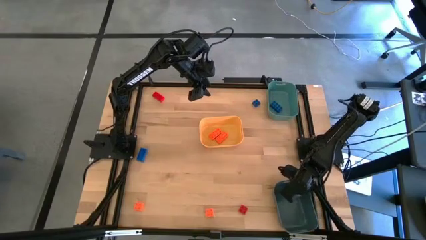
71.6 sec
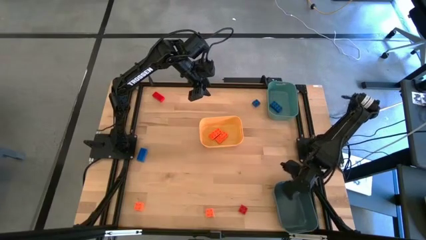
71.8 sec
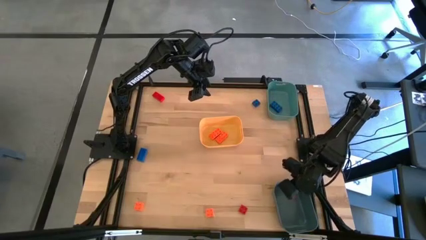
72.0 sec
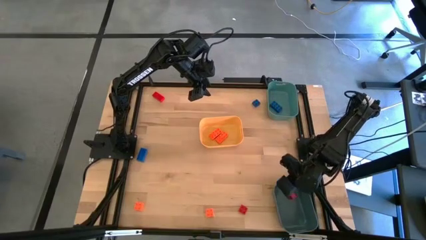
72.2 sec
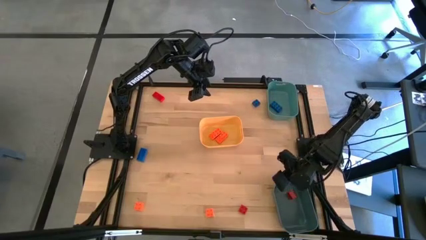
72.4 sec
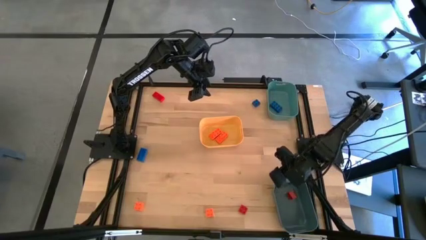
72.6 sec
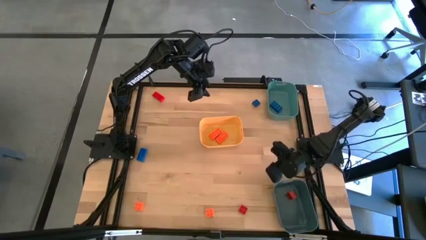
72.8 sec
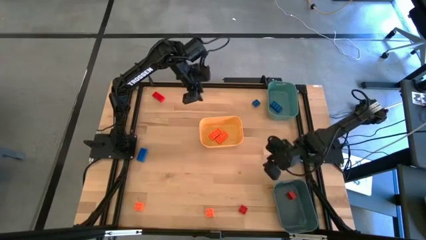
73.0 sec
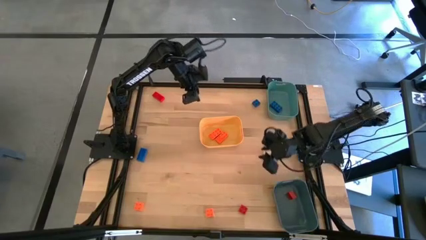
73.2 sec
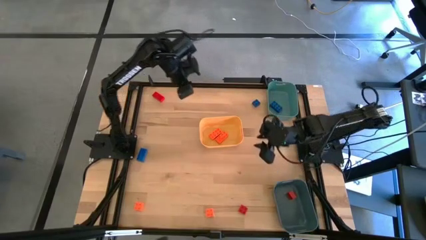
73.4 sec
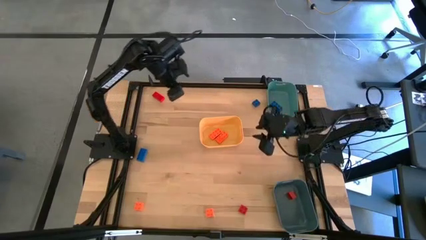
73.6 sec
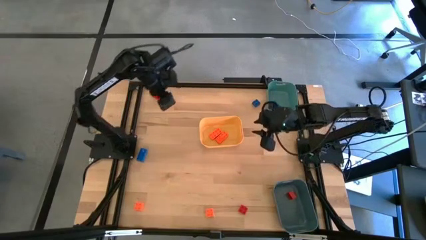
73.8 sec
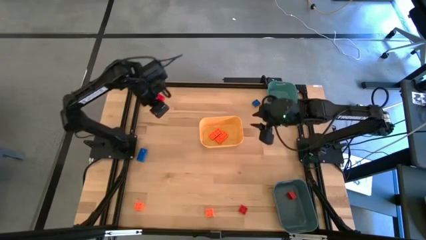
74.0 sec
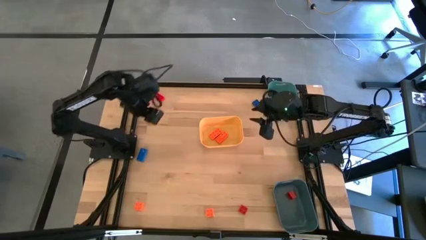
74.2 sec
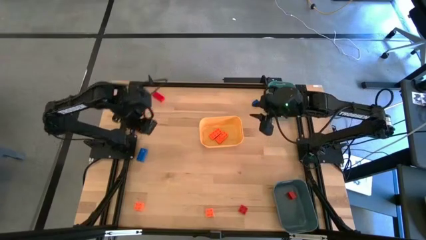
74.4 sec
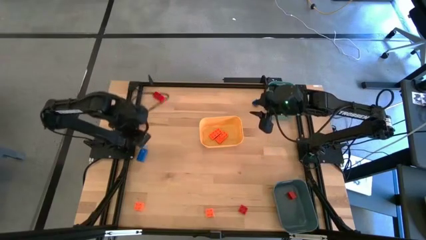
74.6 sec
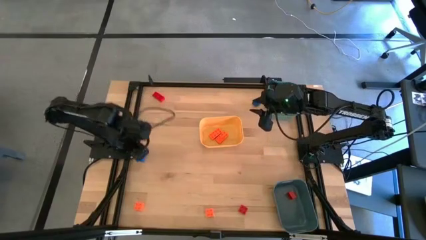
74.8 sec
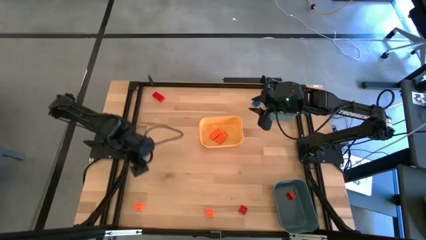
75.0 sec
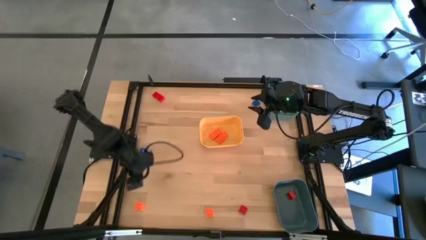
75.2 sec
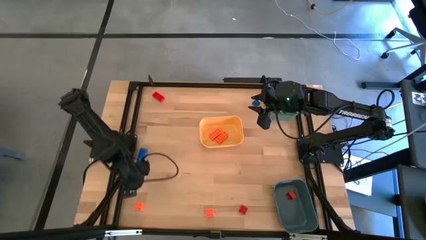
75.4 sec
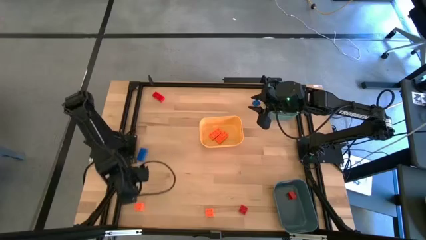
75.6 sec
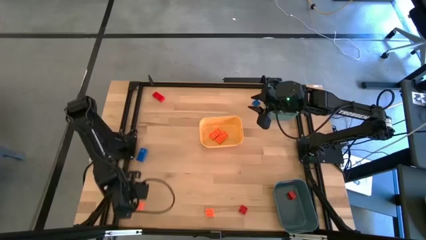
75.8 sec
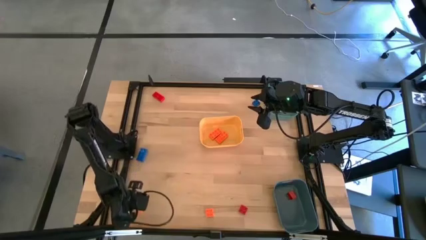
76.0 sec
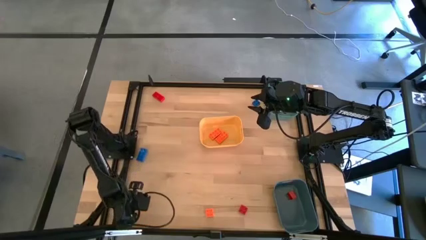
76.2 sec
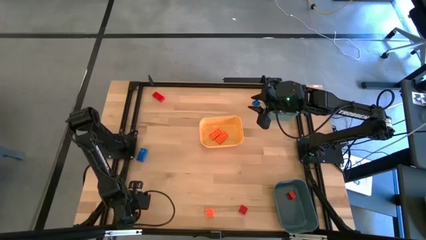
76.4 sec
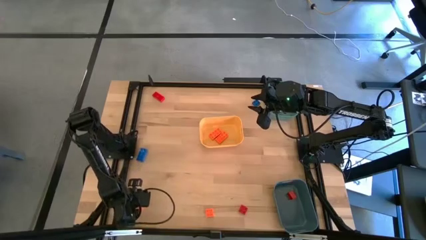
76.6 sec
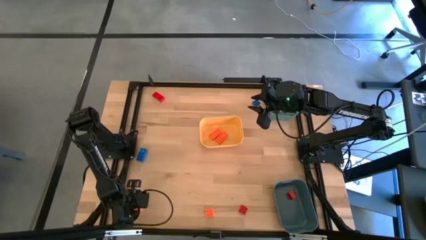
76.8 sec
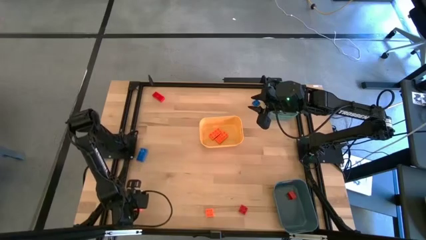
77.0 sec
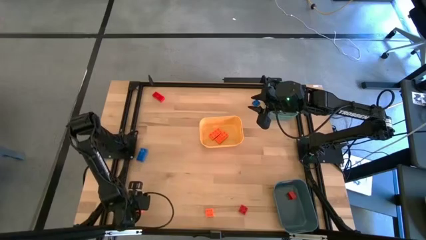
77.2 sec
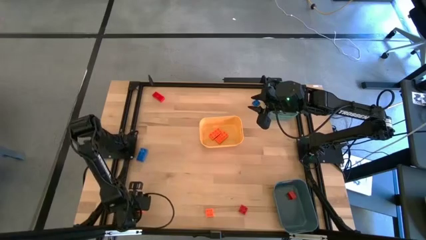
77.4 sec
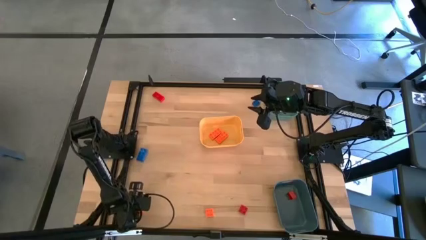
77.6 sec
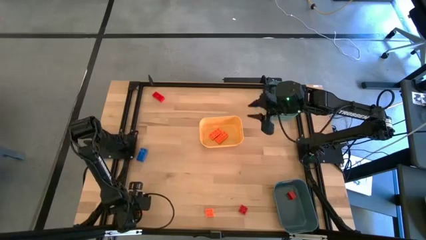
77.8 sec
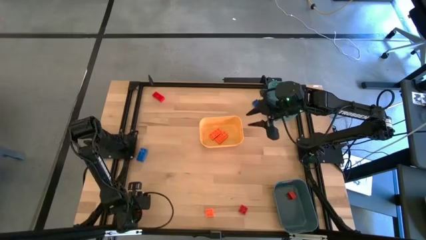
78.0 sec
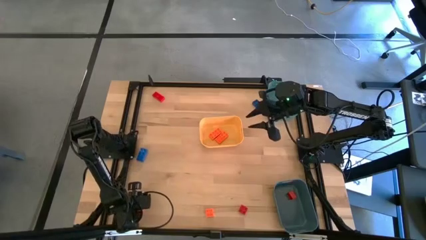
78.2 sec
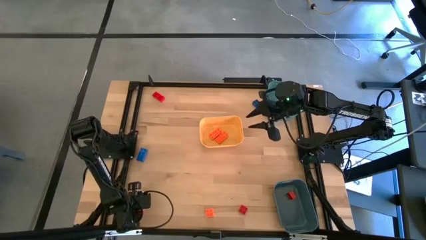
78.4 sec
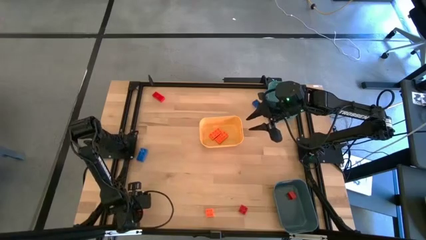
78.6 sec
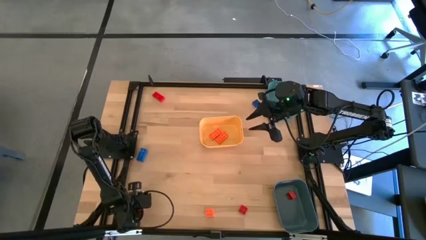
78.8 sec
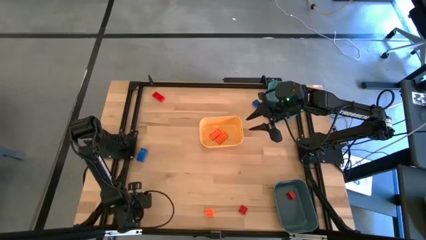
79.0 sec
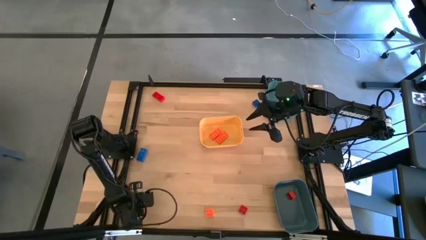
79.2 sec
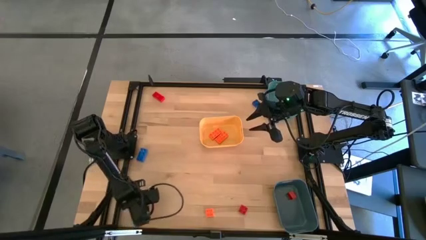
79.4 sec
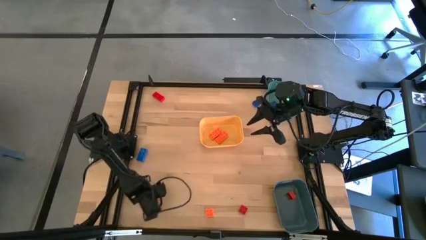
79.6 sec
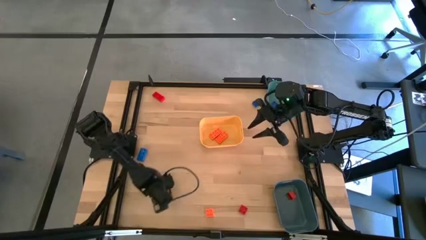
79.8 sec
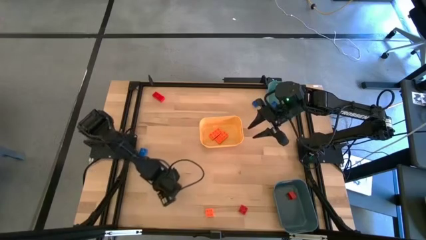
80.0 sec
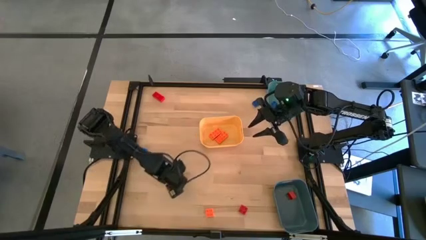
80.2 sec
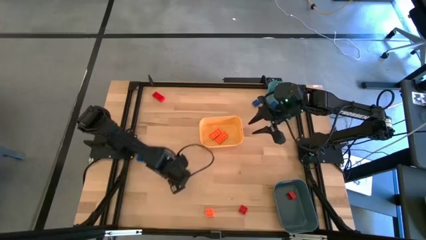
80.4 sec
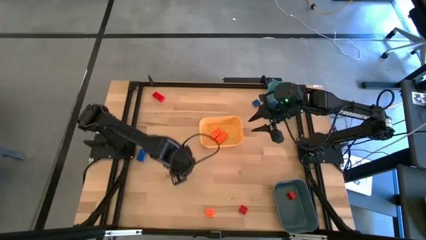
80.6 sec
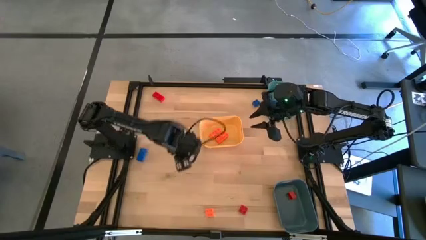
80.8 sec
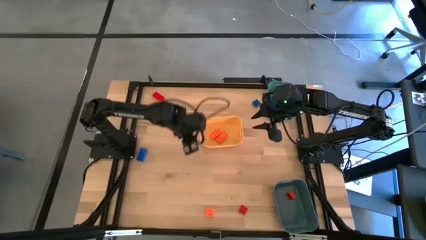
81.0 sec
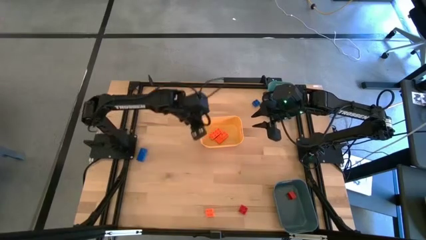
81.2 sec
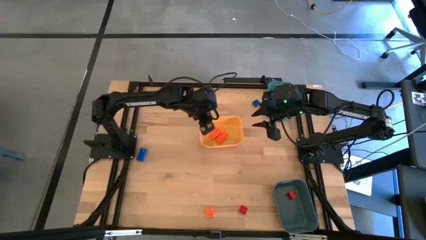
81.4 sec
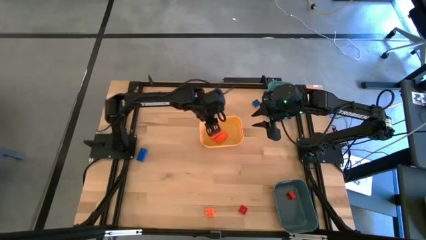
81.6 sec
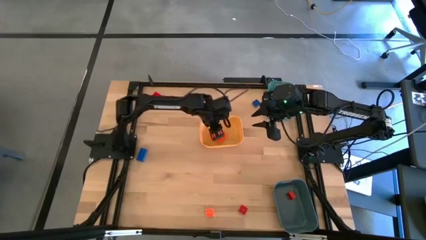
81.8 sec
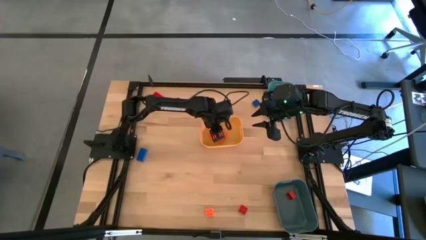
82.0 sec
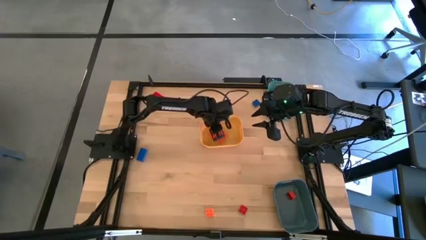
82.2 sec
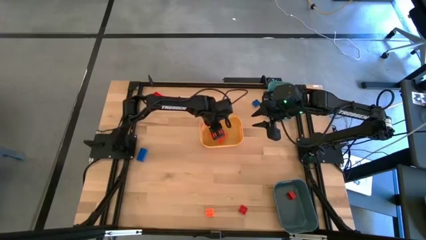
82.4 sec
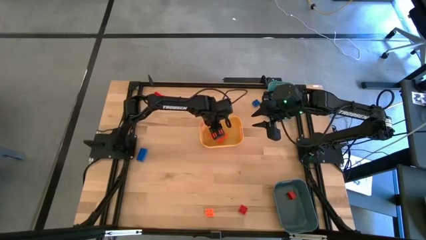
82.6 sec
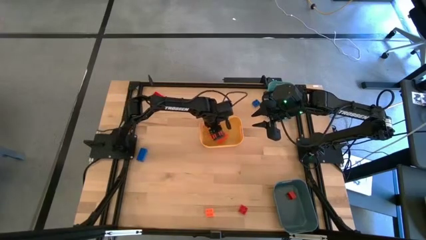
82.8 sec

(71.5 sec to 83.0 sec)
Task: Sort & place blocks by color
Put the orange game piece into the yellow bin

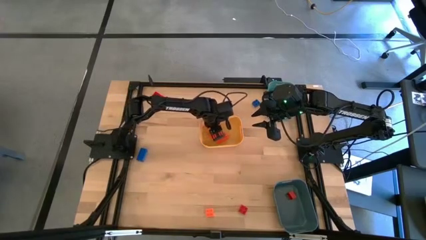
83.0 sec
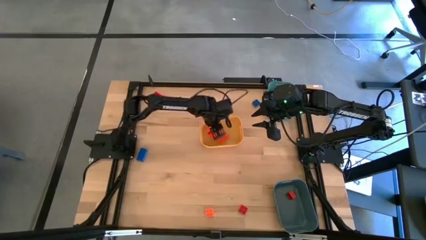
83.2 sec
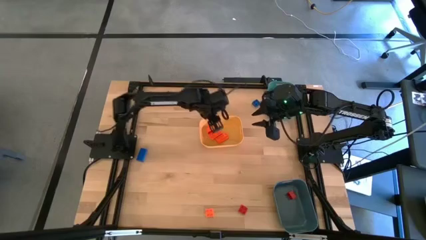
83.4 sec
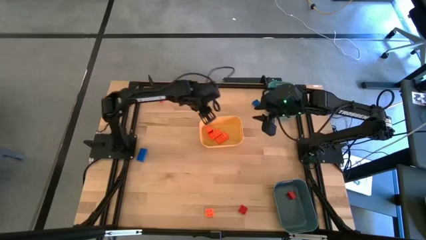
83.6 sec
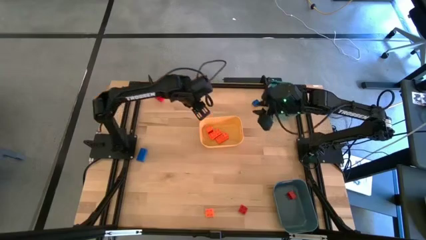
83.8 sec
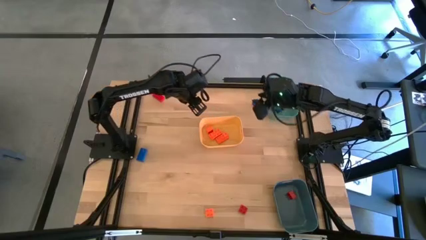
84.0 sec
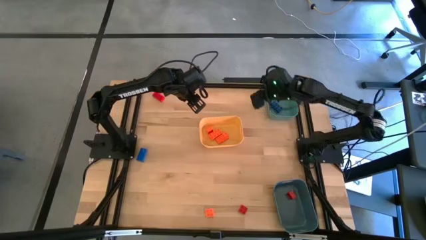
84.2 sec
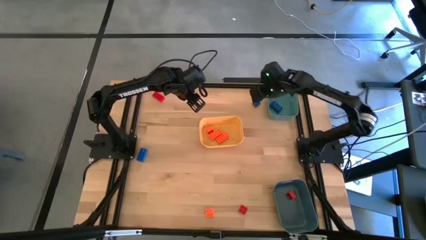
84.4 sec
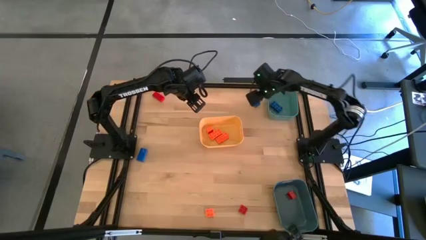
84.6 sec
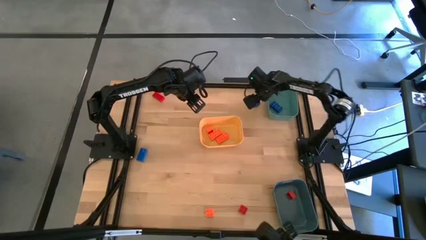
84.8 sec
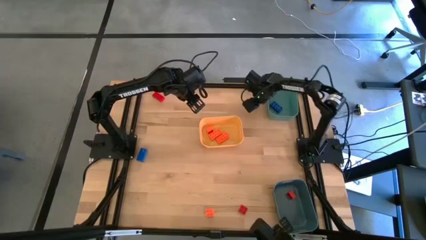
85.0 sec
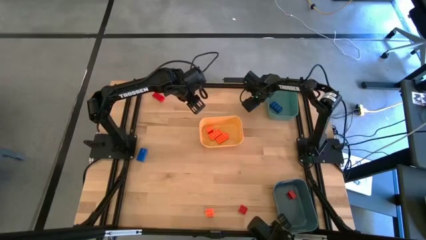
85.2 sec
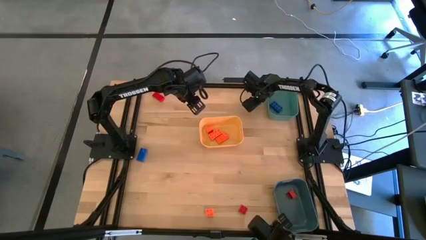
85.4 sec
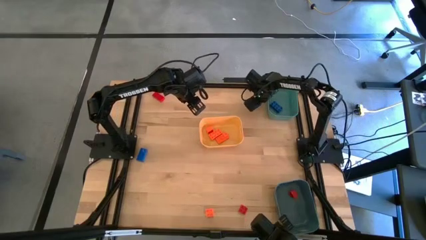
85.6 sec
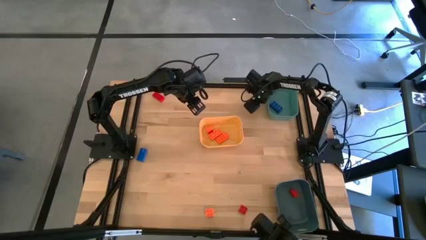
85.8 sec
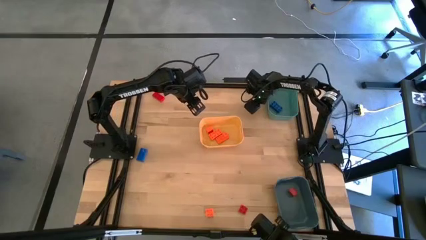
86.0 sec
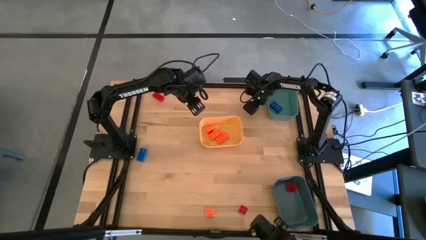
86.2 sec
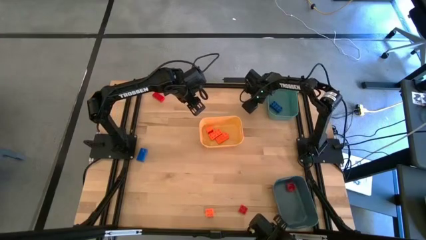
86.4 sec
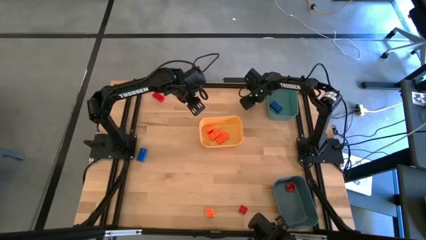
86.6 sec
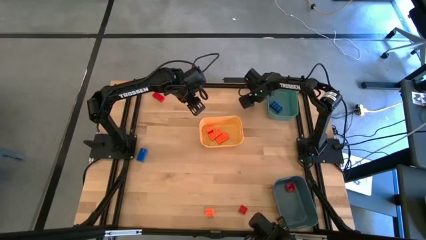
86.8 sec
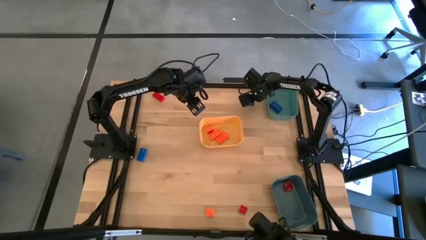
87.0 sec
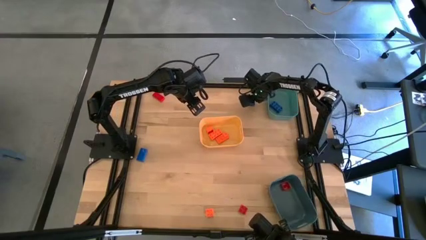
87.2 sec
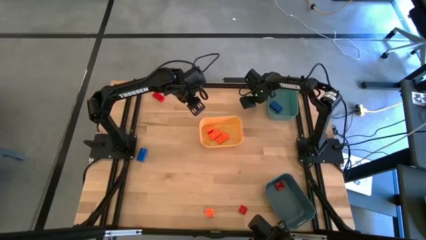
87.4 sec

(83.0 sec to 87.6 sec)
Put the blue game piece into the green bin

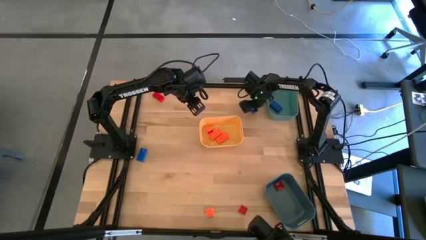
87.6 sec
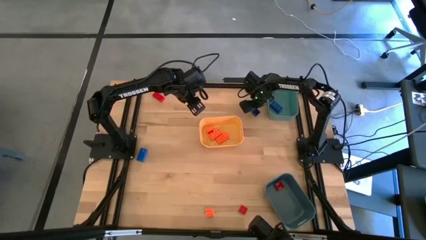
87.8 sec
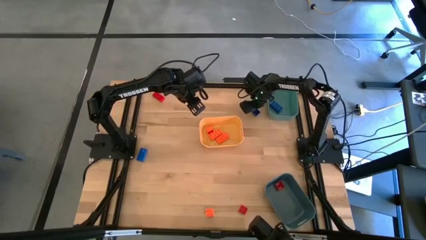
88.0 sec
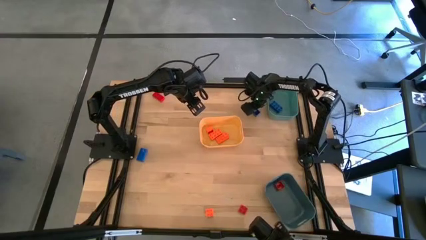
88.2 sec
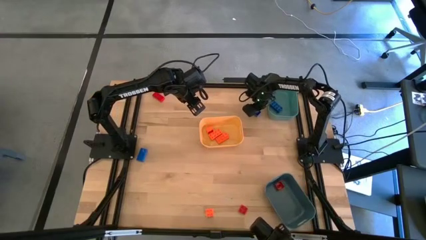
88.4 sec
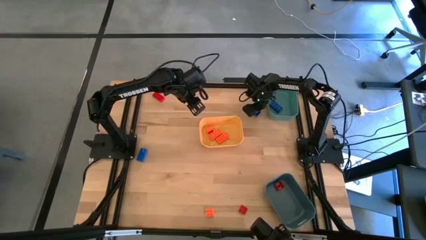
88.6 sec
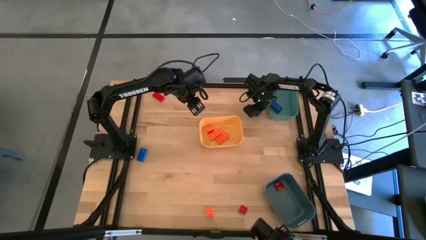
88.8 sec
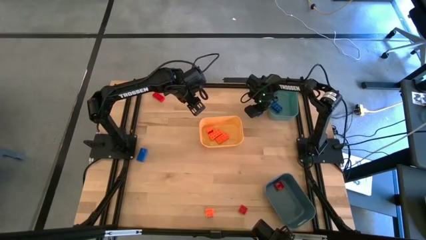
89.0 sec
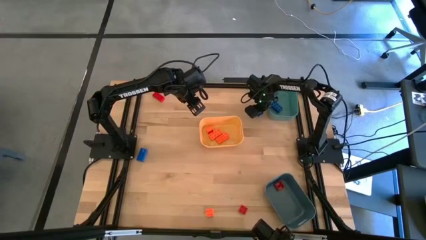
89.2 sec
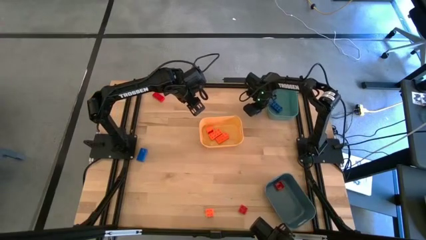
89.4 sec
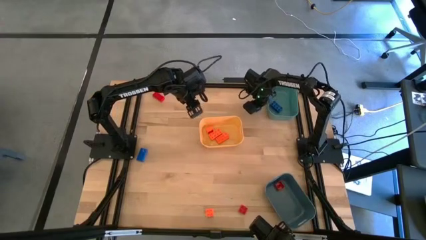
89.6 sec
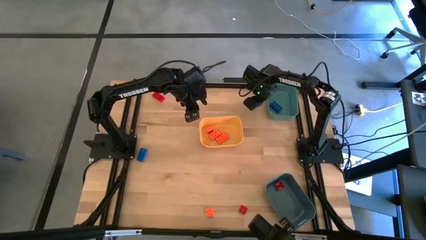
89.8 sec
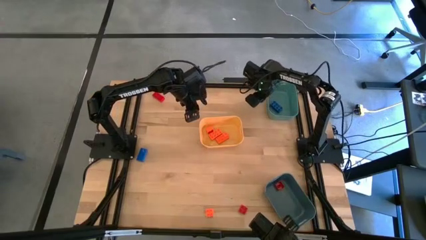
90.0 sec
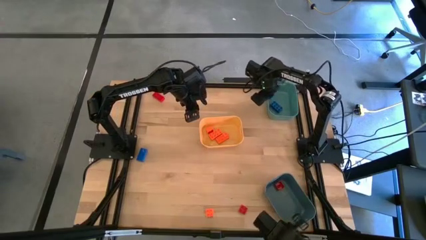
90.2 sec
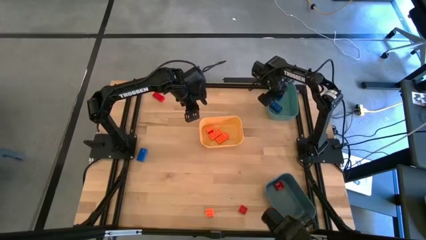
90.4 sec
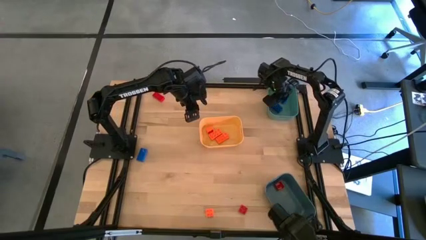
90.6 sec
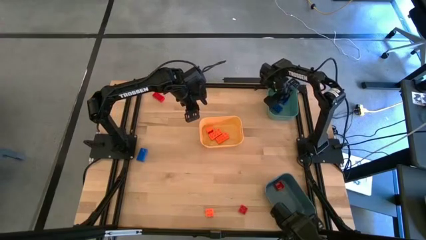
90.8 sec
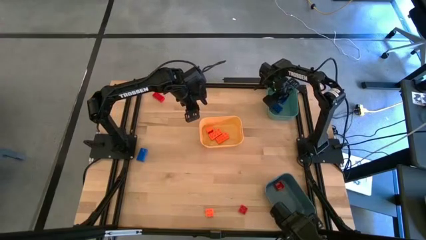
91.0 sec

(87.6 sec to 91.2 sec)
Put the blue game piece into the green bin
